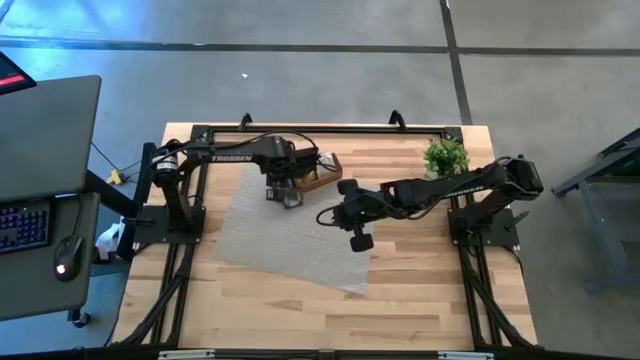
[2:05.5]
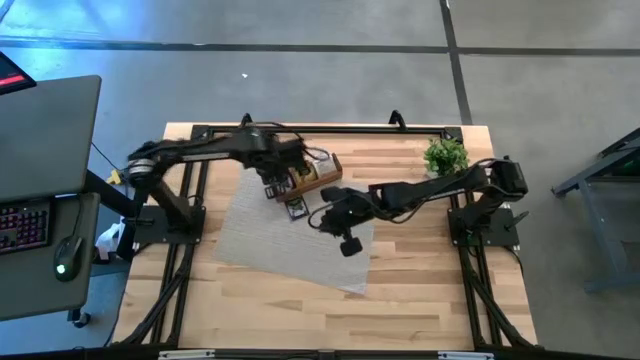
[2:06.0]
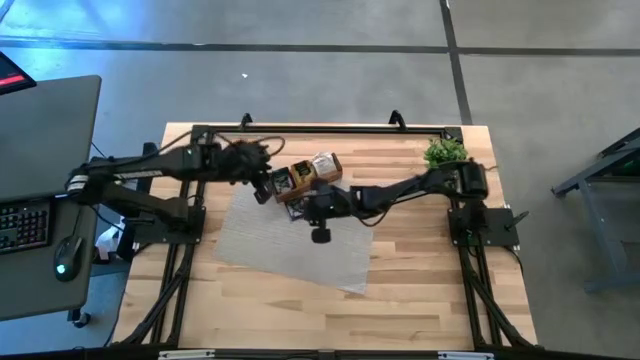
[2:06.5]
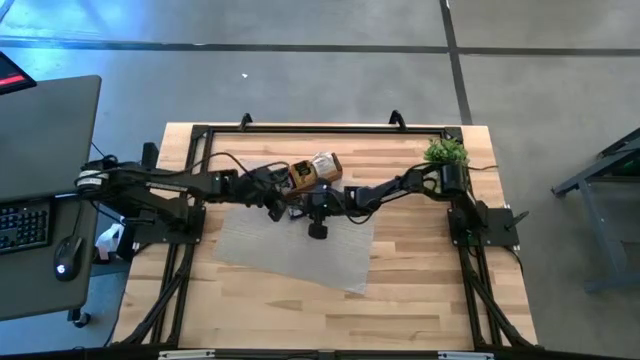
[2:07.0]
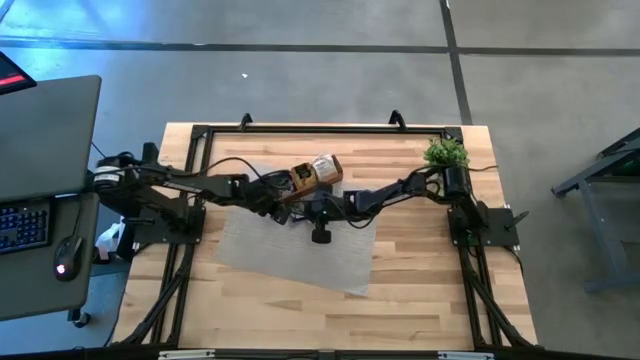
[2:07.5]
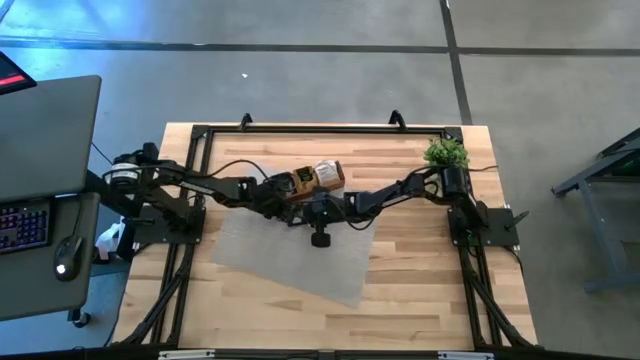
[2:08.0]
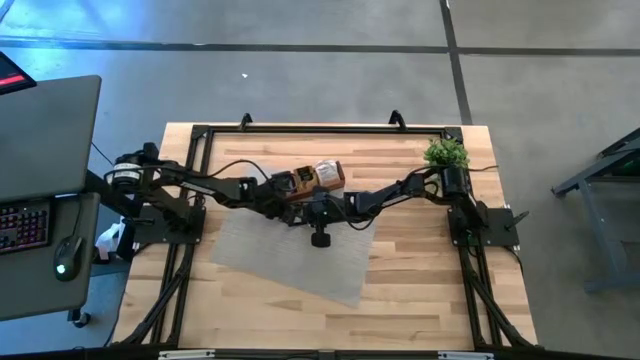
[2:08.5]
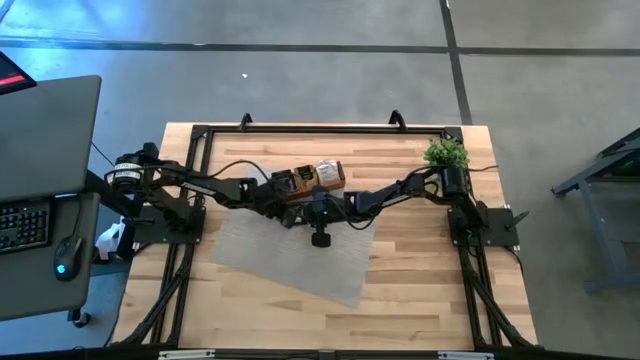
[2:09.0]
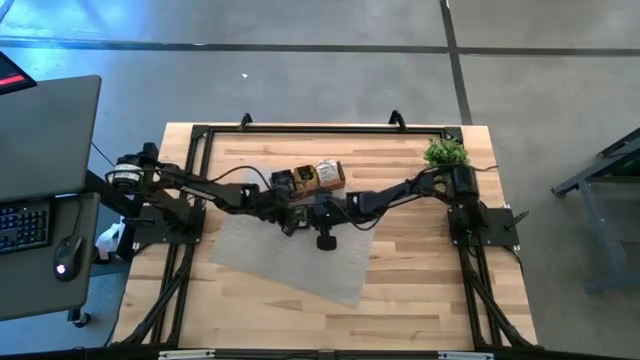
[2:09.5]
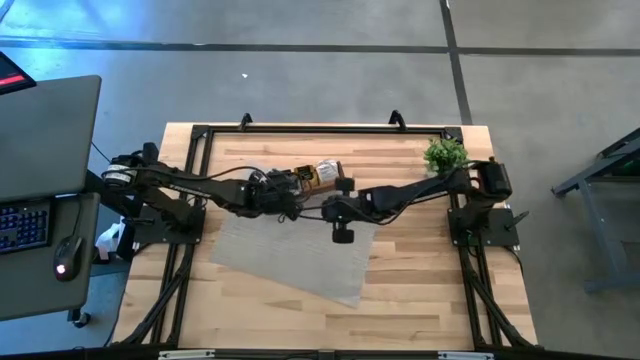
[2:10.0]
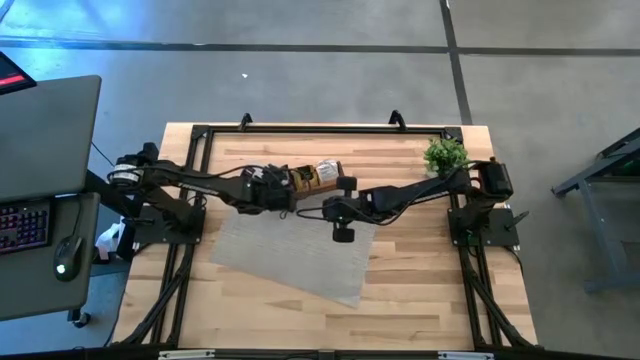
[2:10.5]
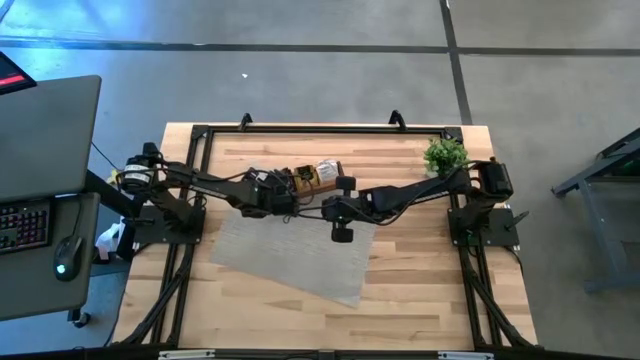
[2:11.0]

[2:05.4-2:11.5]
Task: Pick & Place Tea
Put the purple tea bag into the left section of the wooden organizer

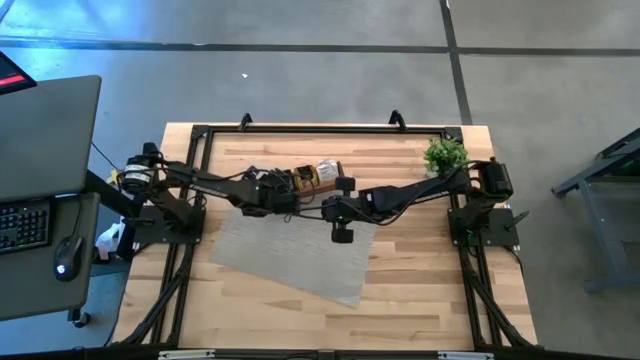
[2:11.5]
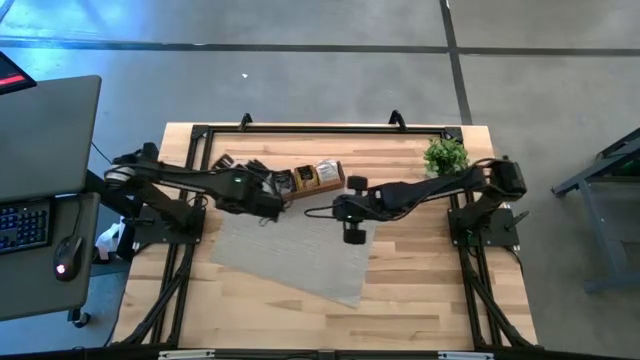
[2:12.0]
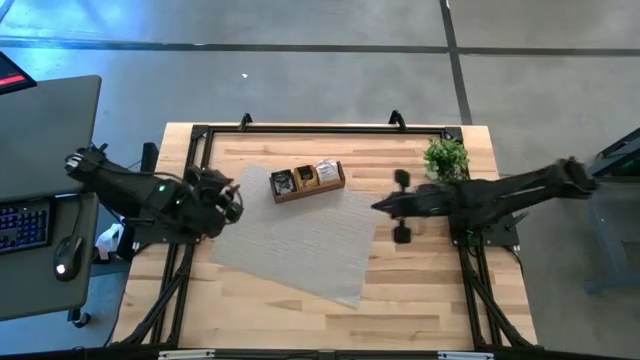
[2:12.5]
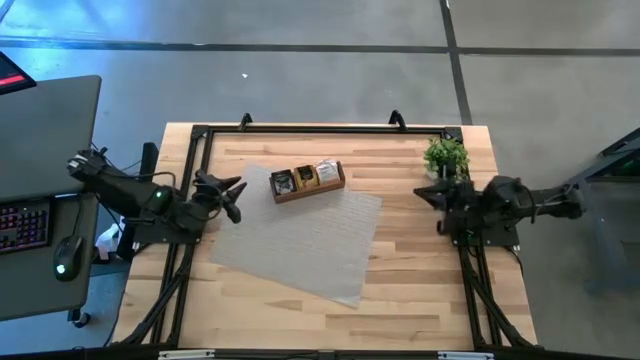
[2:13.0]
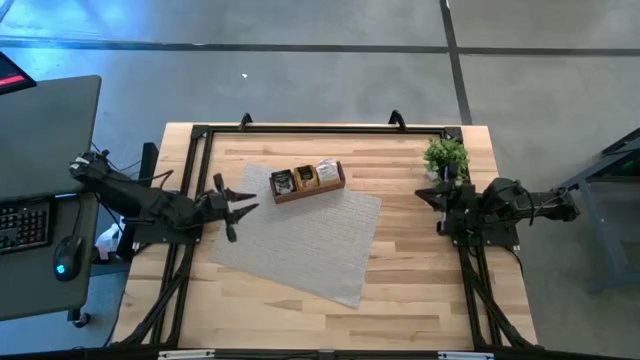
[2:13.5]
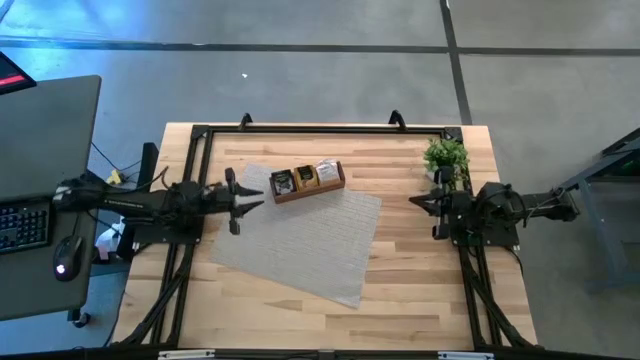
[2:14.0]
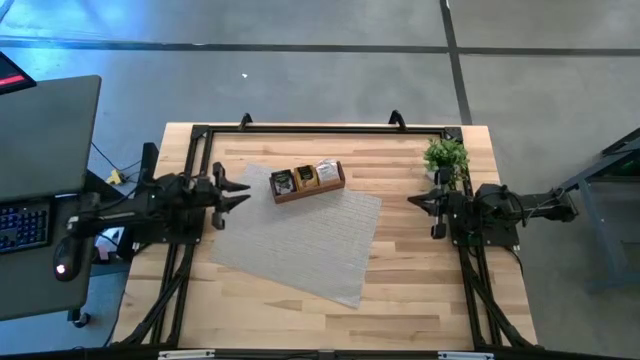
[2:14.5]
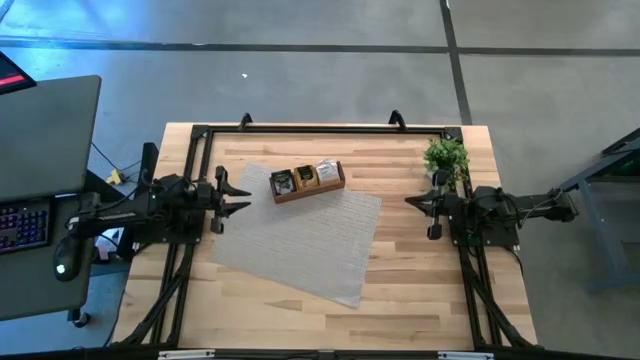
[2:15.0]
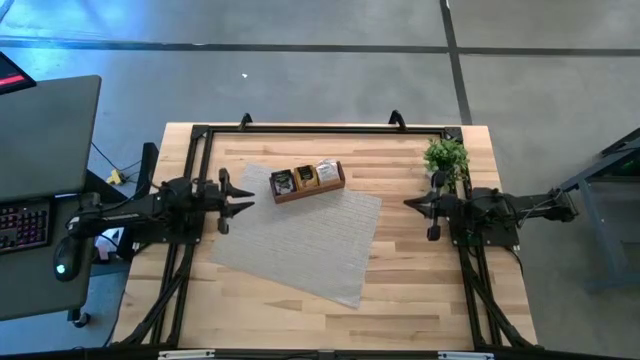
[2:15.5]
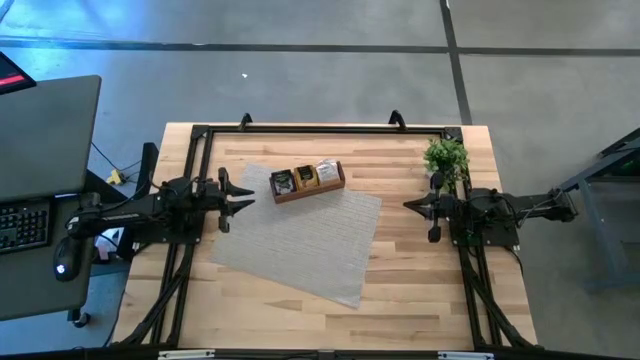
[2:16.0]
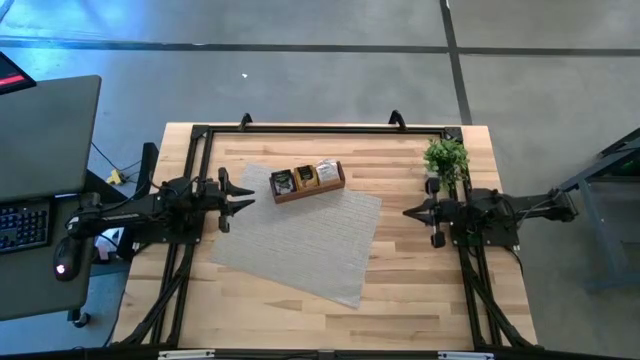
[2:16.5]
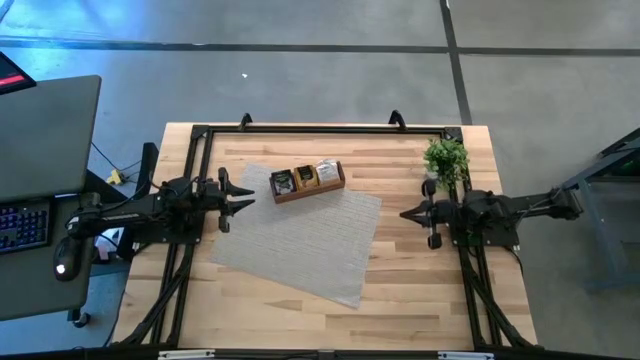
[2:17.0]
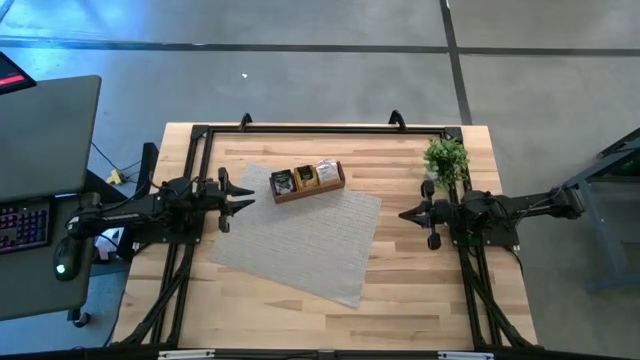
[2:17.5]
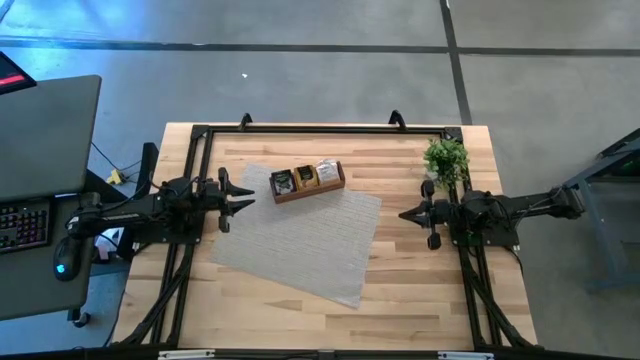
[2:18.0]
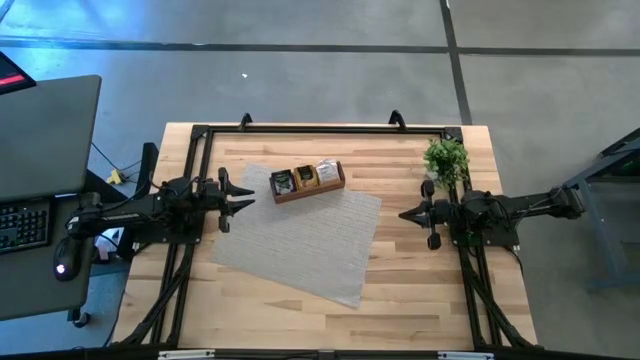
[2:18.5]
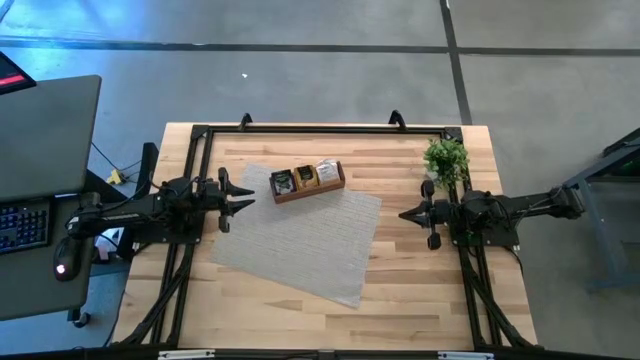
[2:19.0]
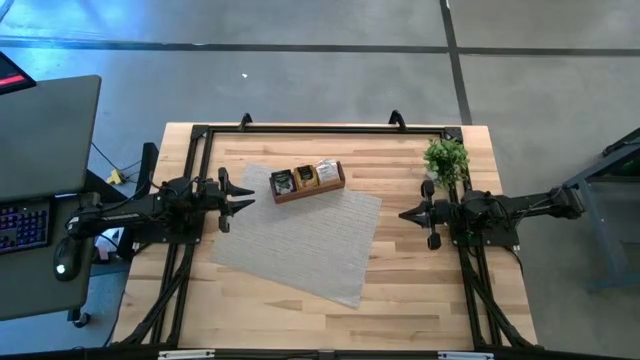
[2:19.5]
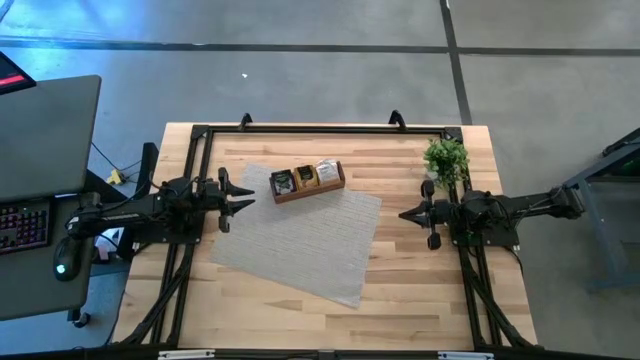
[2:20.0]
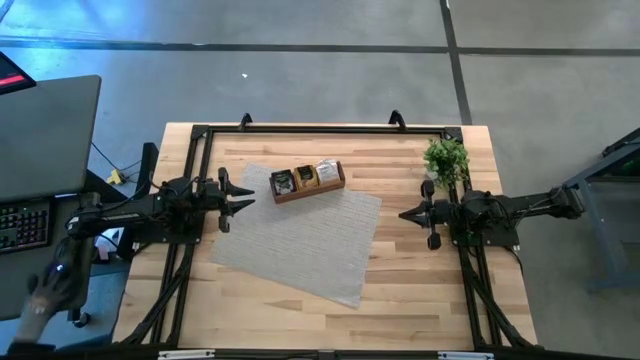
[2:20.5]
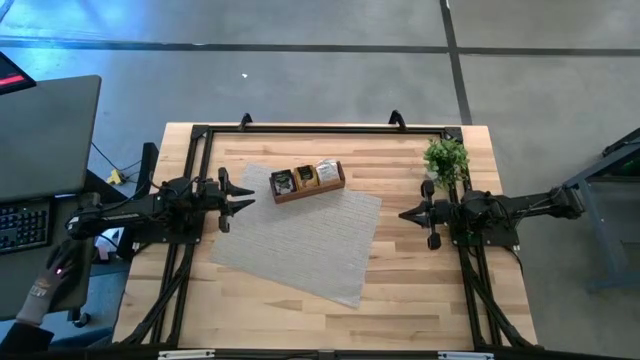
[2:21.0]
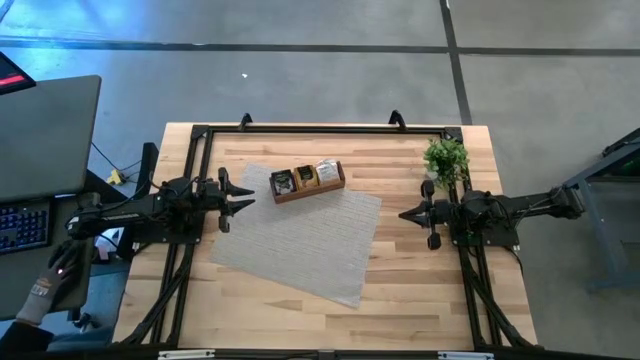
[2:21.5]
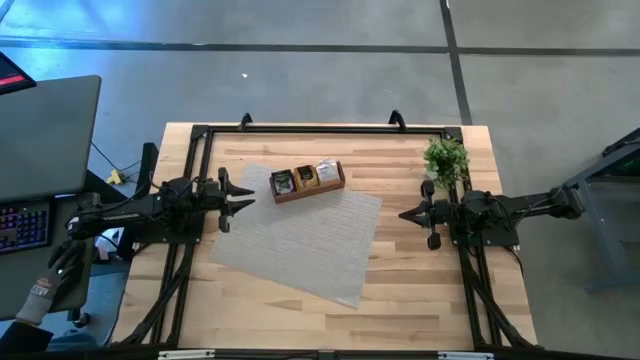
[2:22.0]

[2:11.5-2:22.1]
Return to Home Position

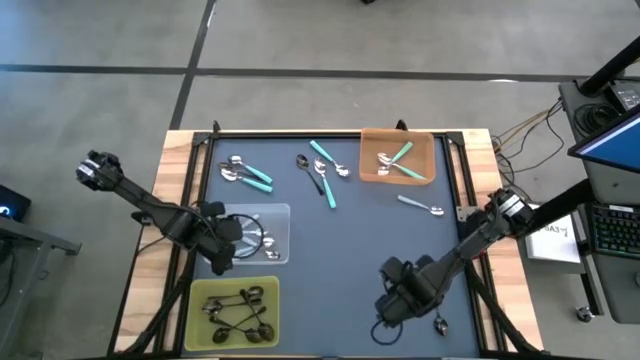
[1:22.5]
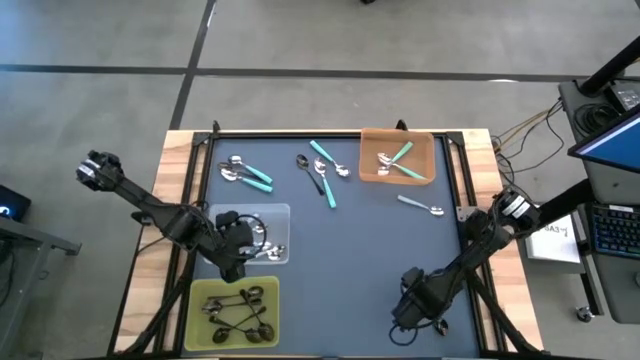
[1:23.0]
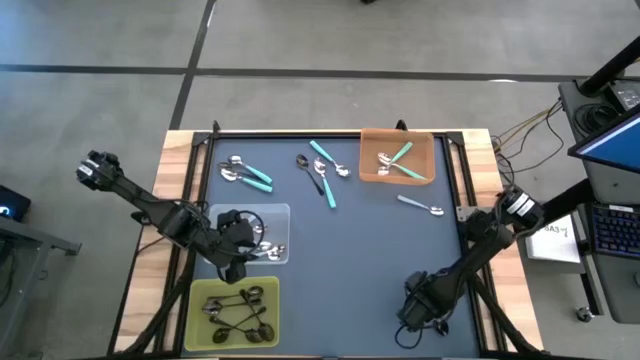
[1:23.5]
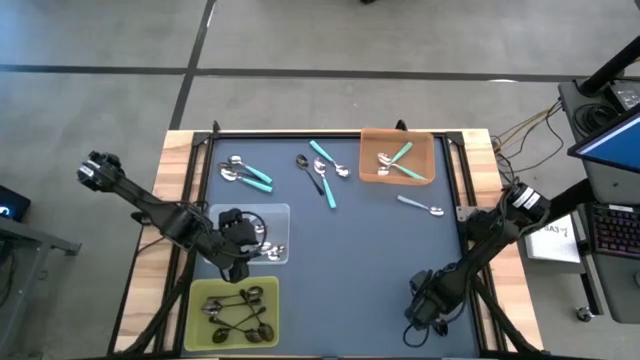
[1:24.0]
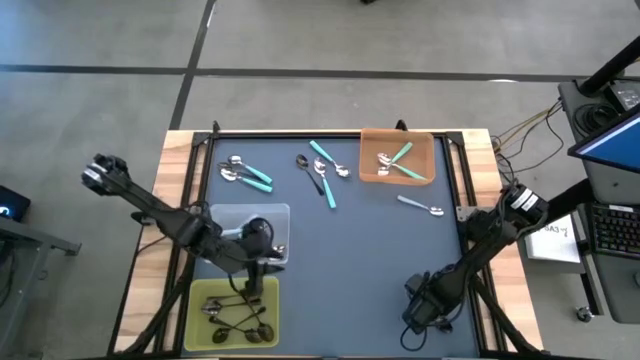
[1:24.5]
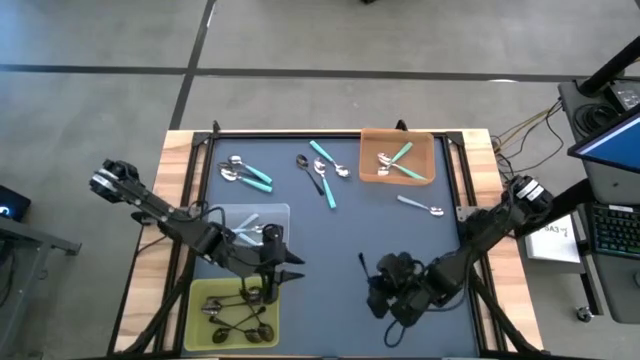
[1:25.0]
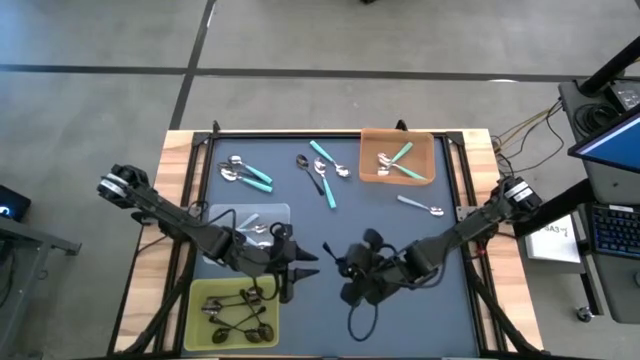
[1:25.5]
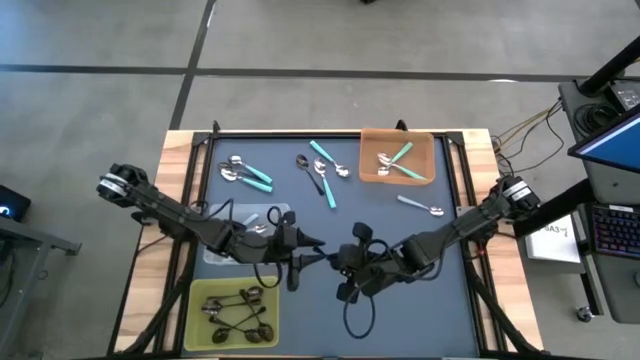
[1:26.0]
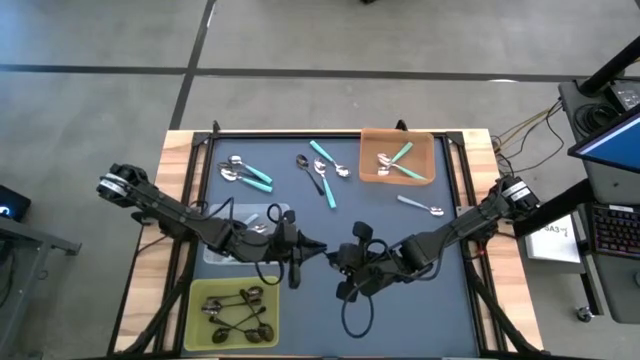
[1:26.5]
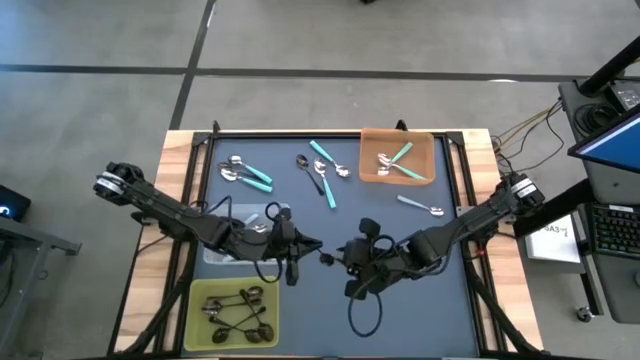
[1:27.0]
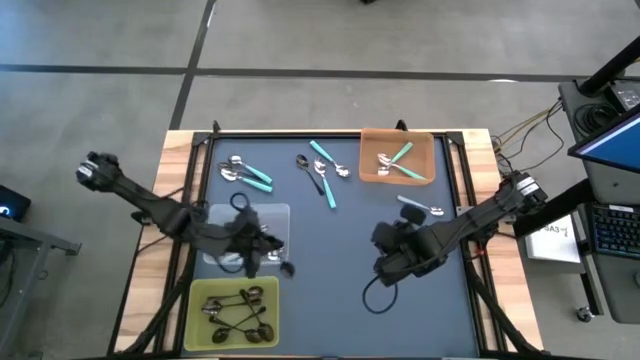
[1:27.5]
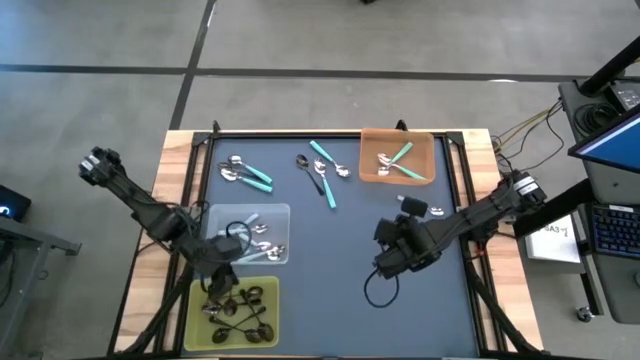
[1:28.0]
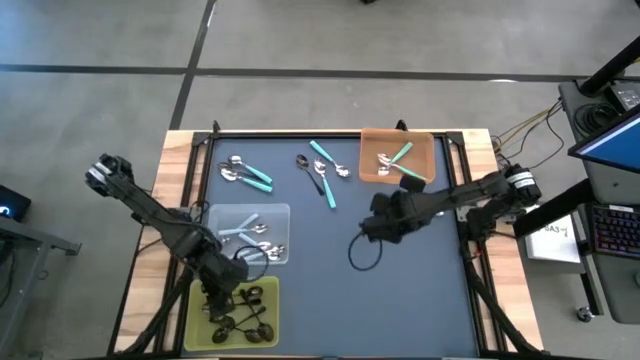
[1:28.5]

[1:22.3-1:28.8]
Task: Sort silverware by color (type)
Put the black spoon into the yellow bin
